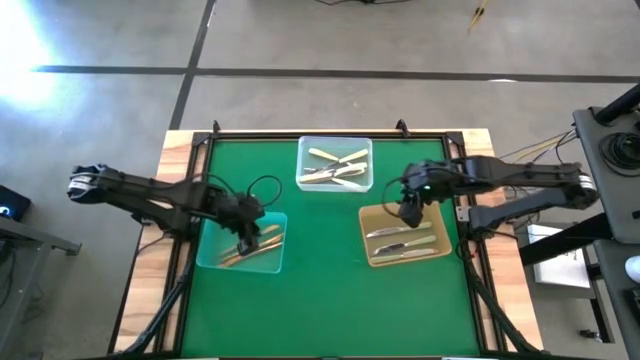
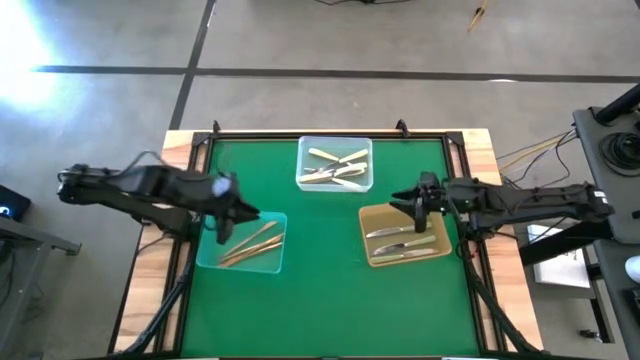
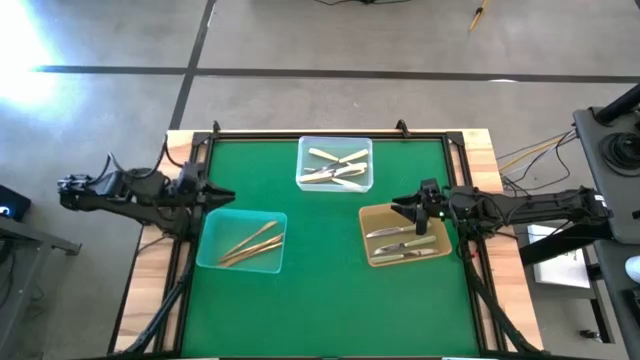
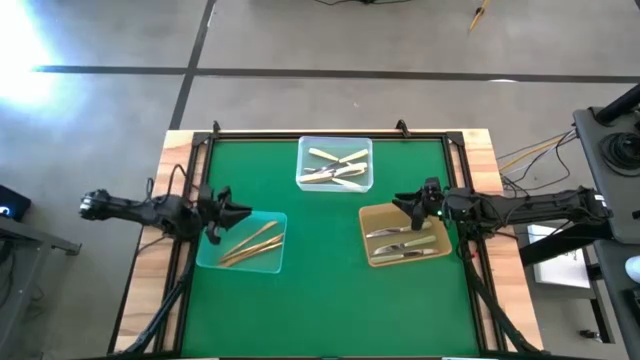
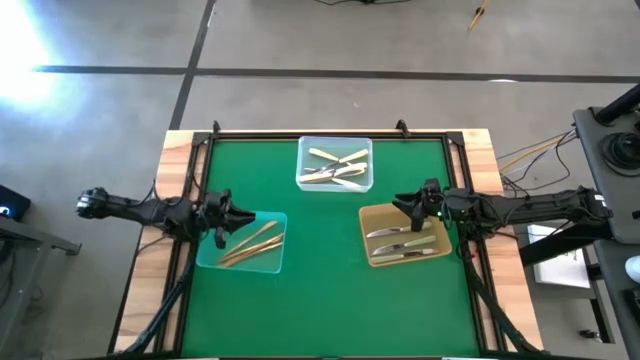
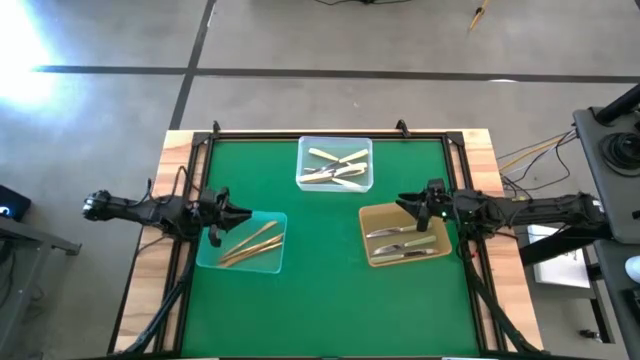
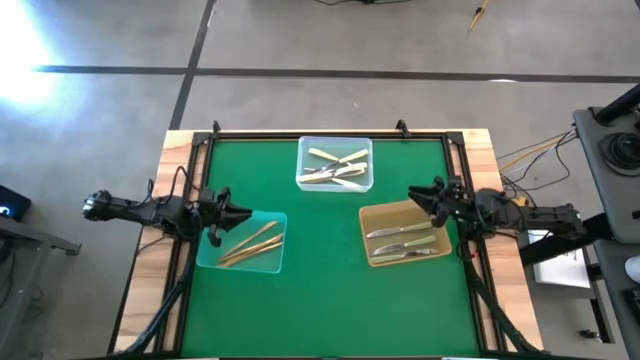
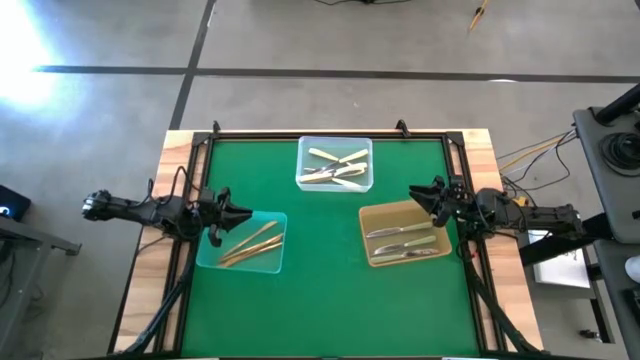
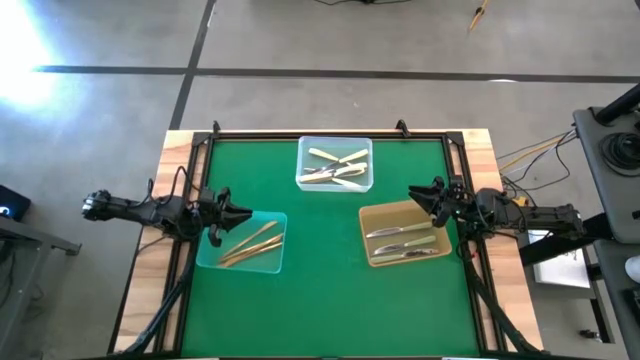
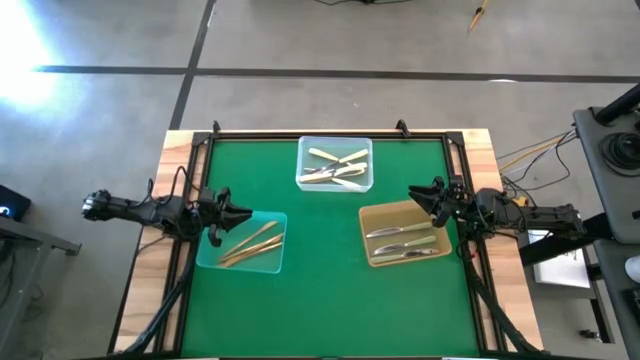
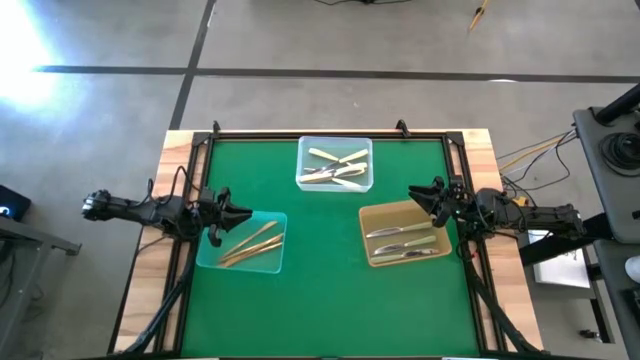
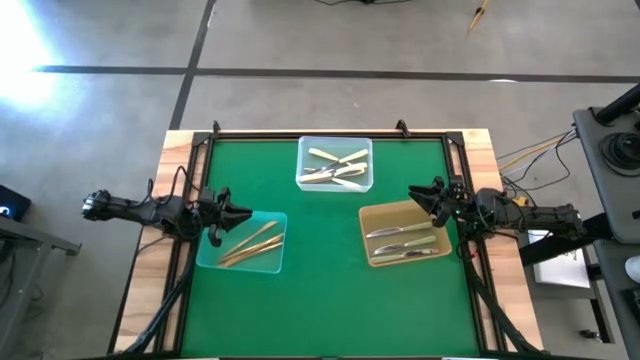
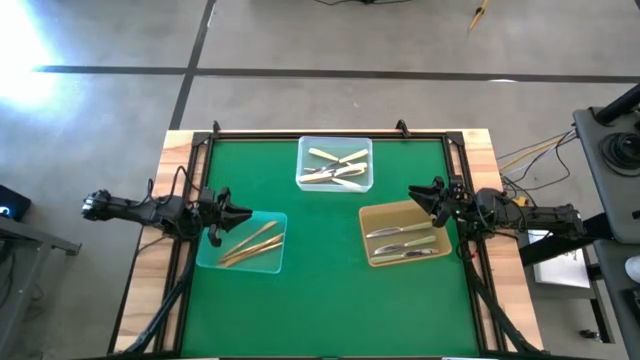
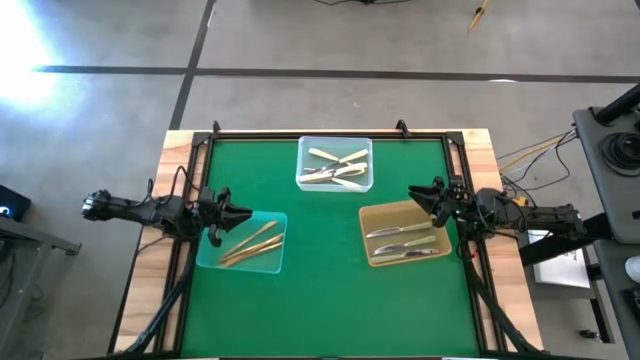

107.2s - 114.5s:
Task: Sort silverware by color (type)
Return to Home Position

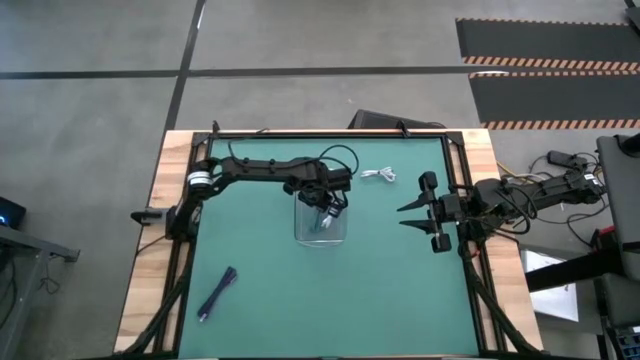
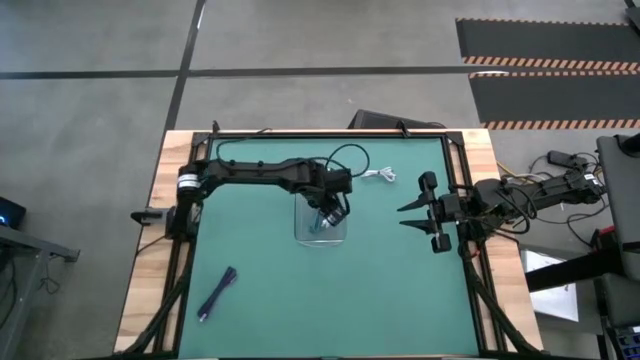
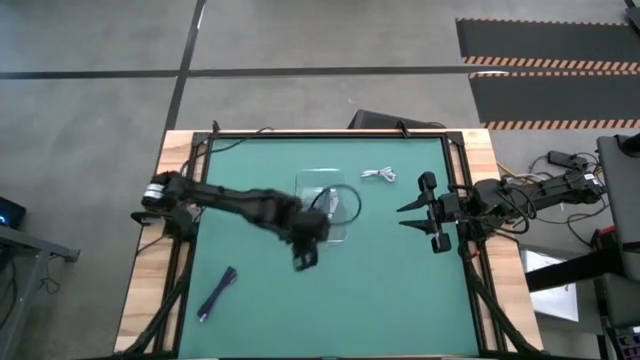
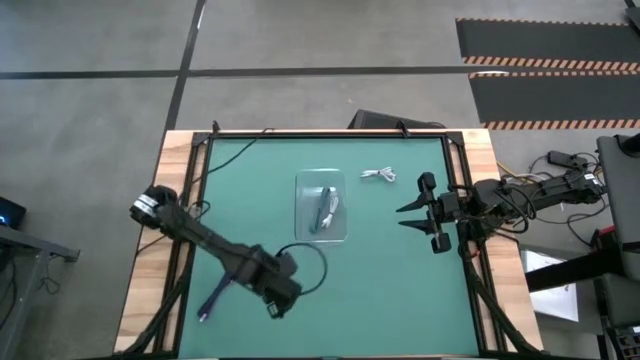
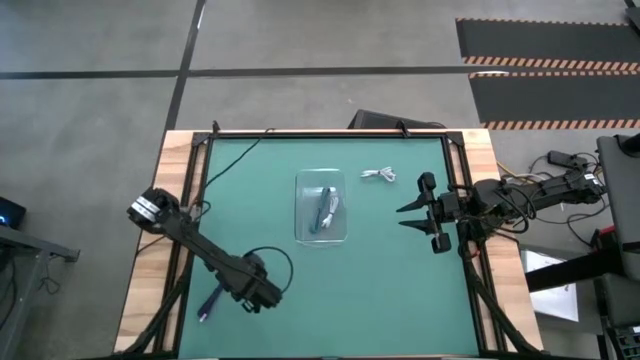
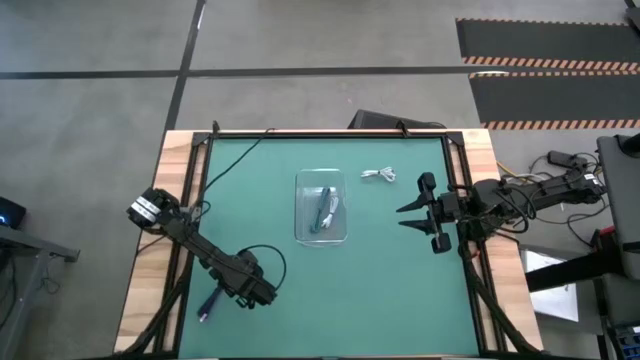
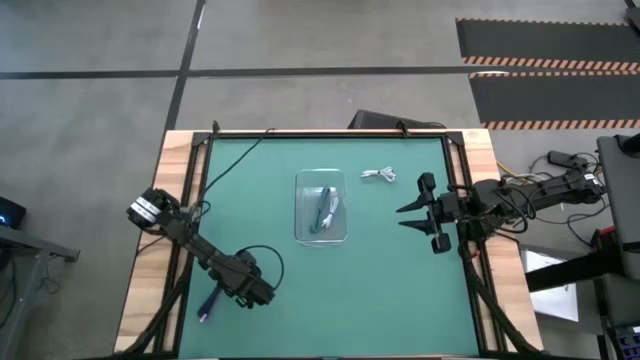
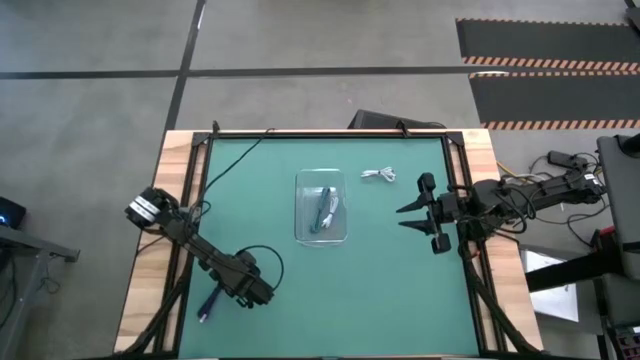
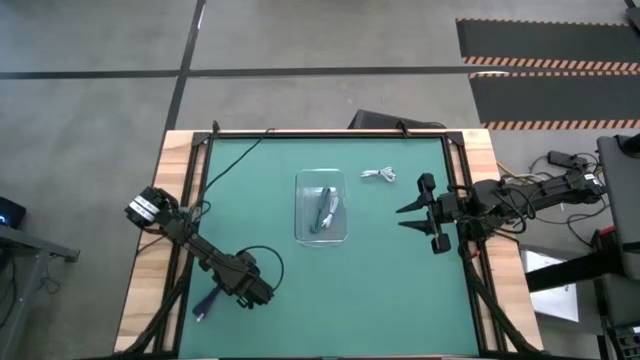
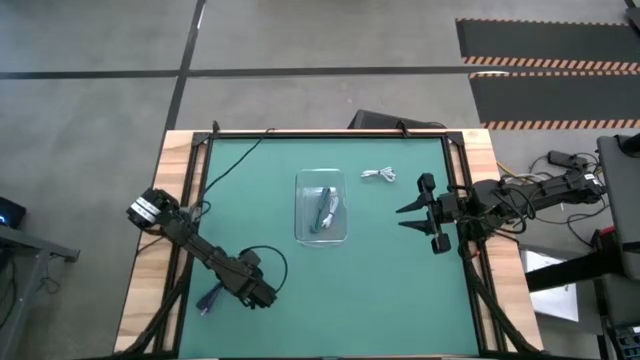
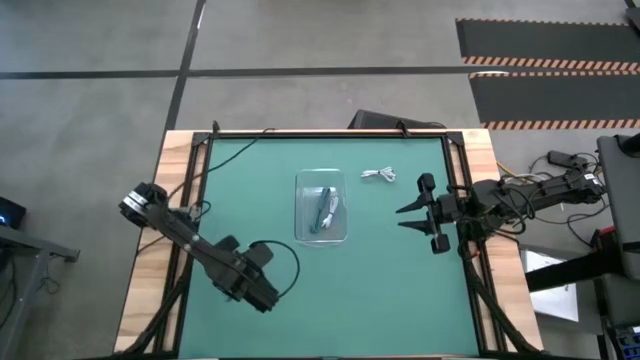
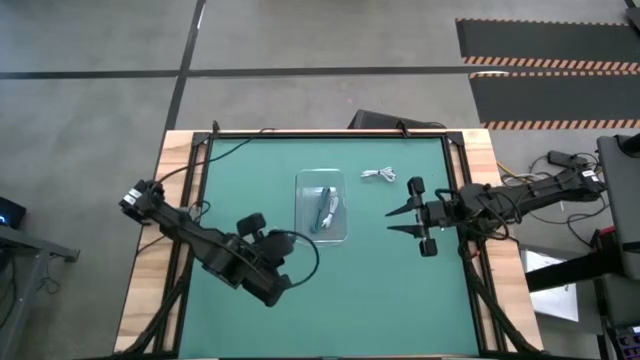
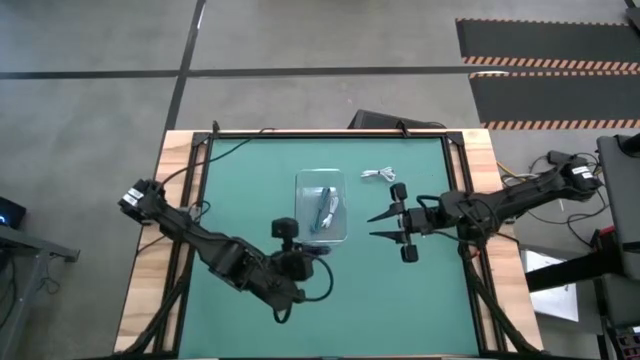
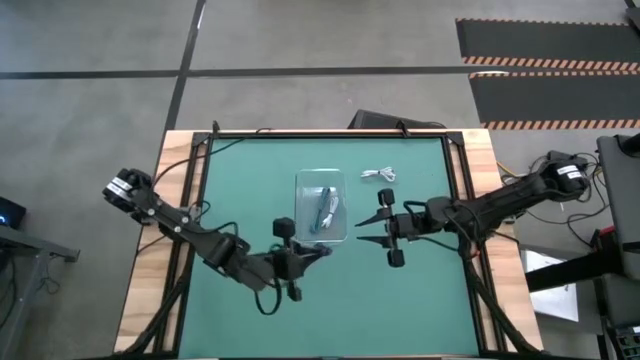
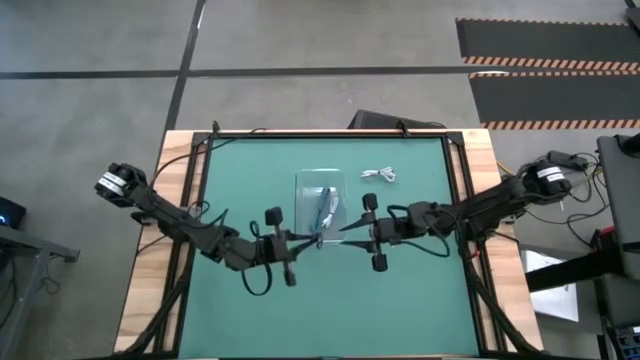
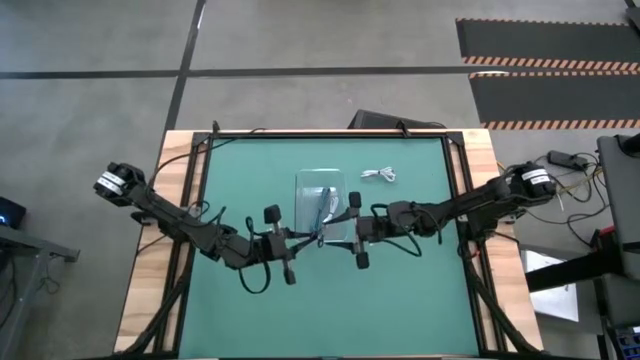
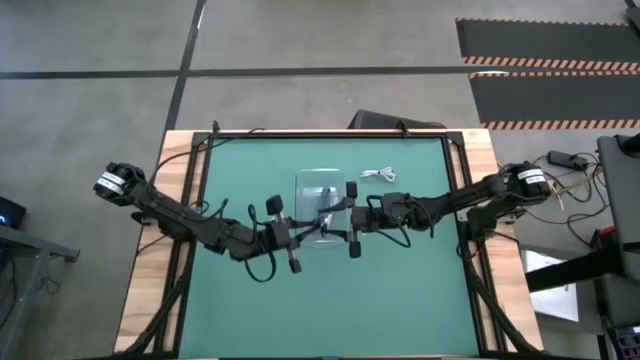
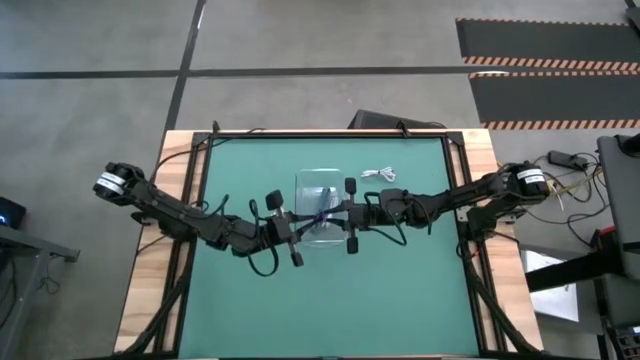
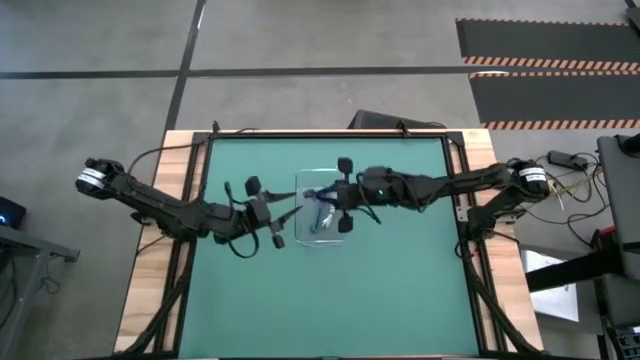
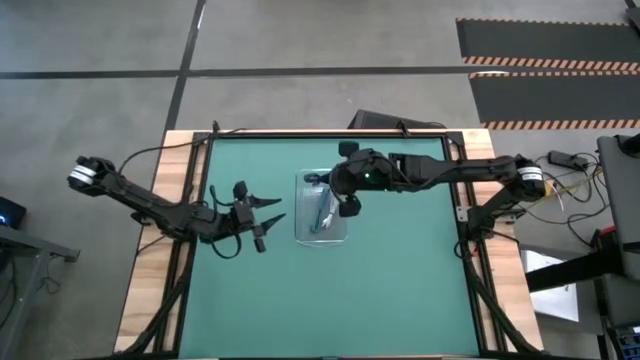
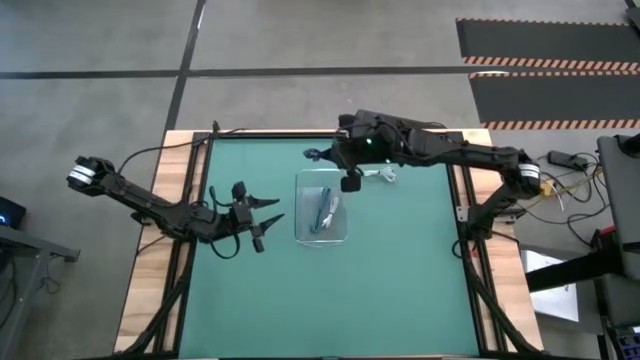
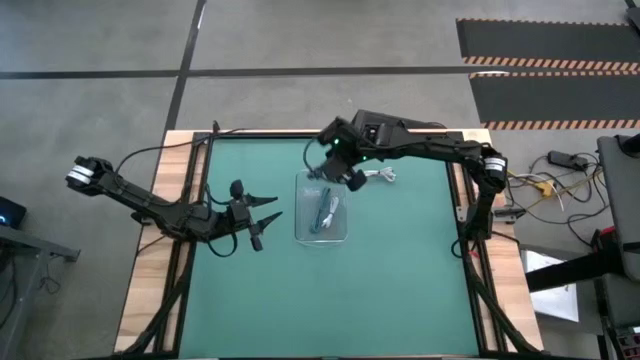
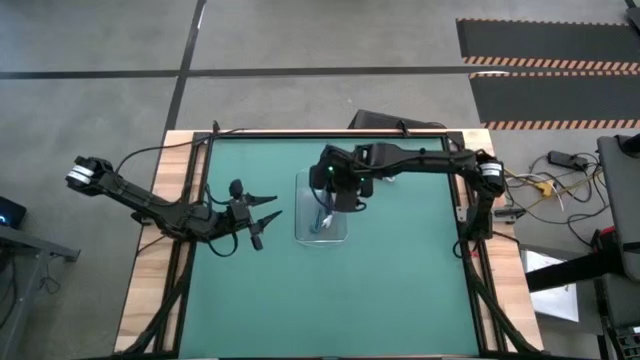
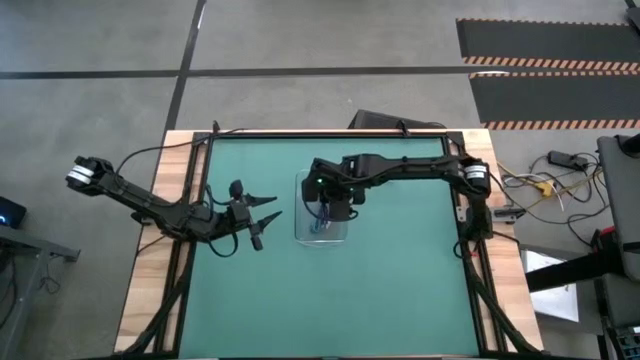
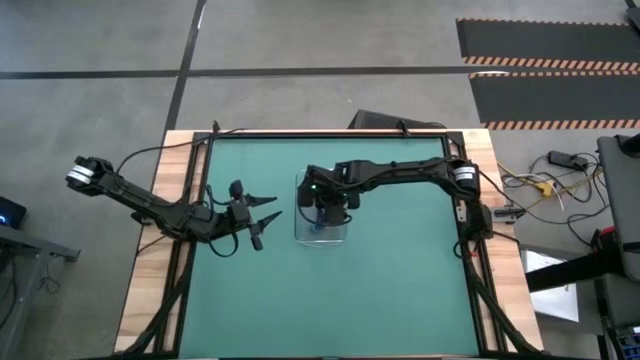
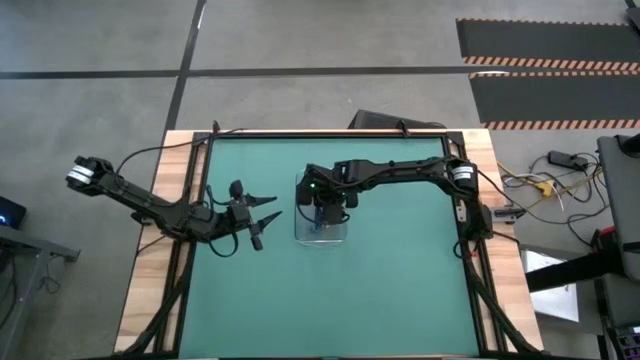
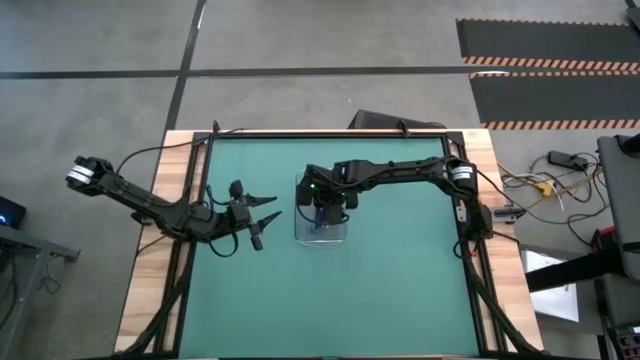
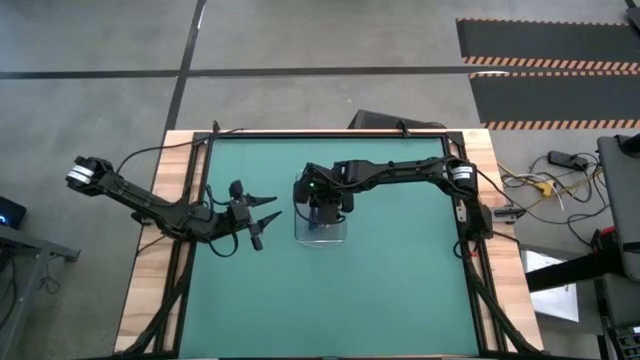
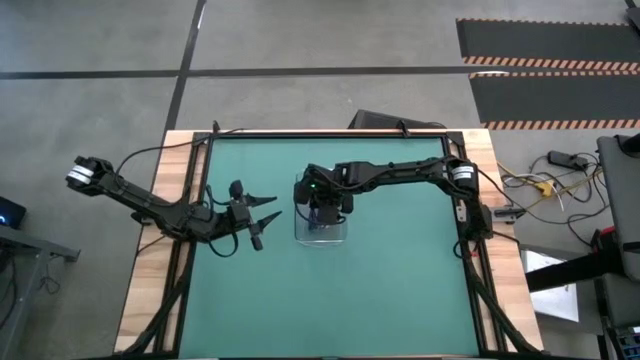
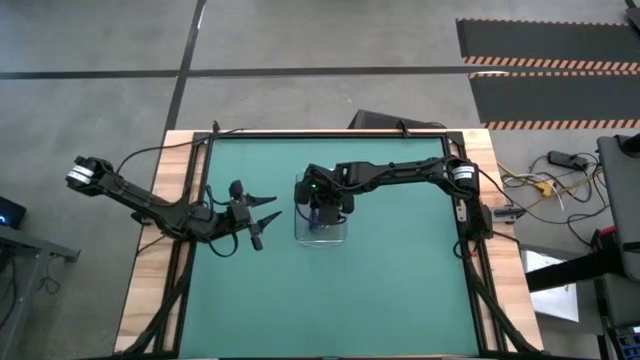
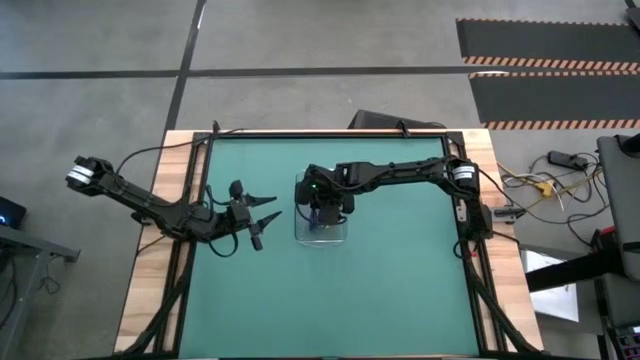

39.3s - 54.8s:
Task: Pick and place USB-C Cables
Put the purple charger cable into the transparent bin
